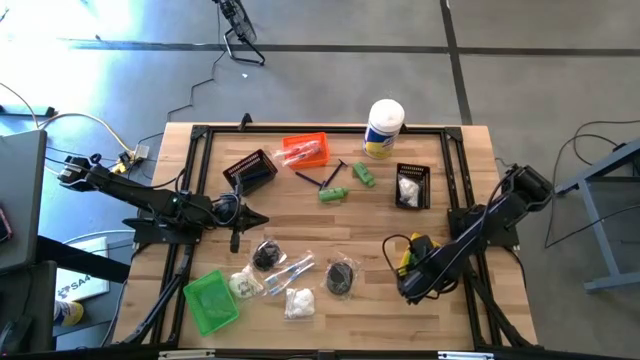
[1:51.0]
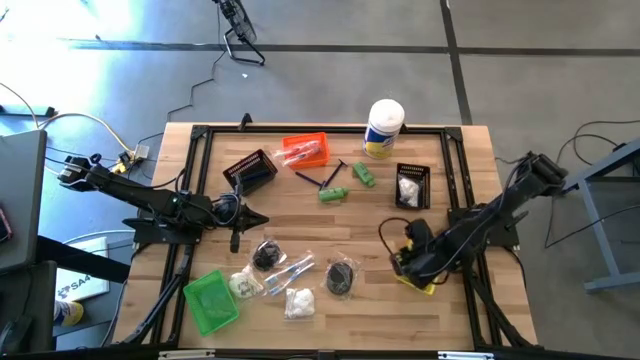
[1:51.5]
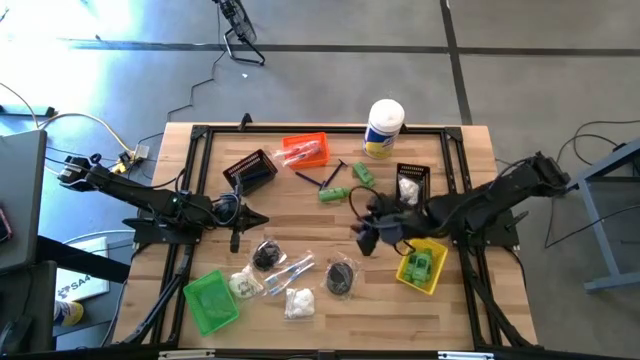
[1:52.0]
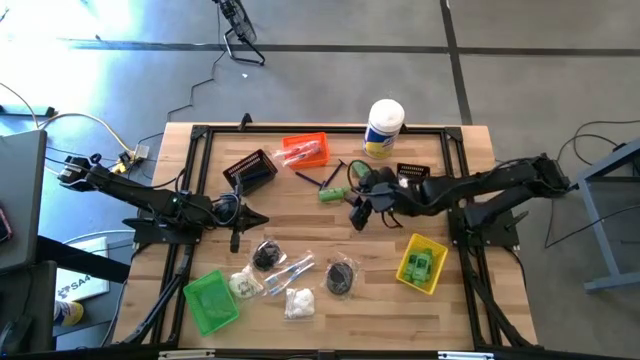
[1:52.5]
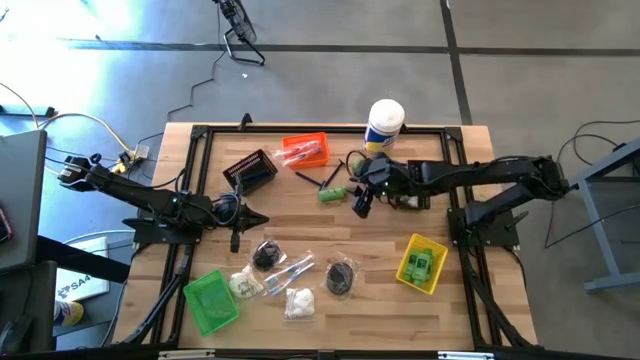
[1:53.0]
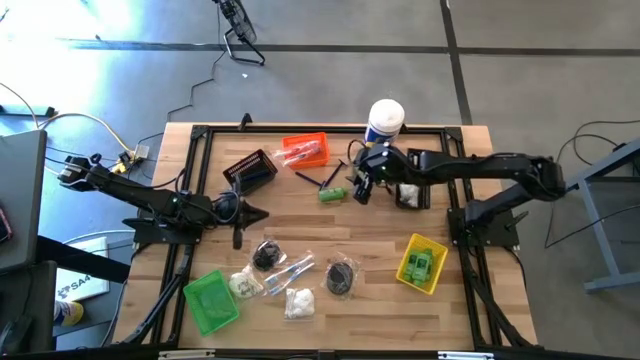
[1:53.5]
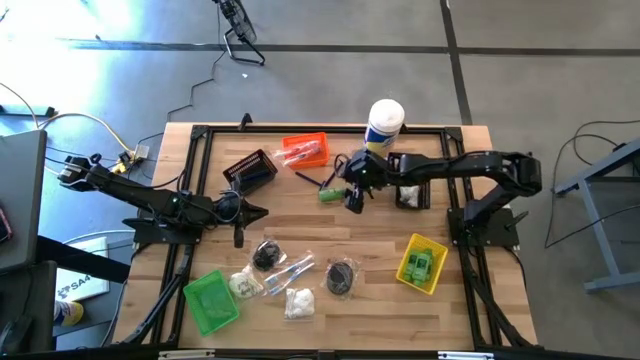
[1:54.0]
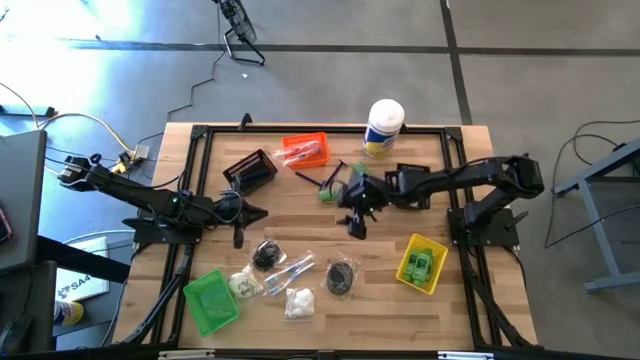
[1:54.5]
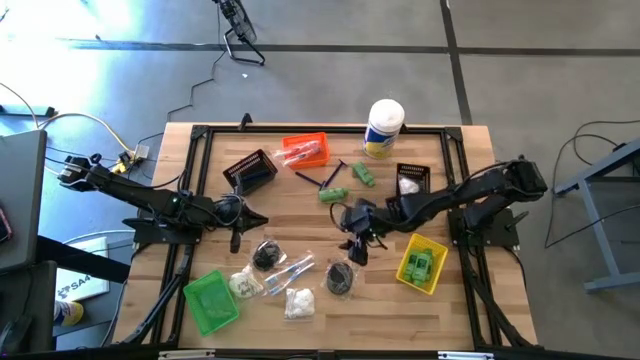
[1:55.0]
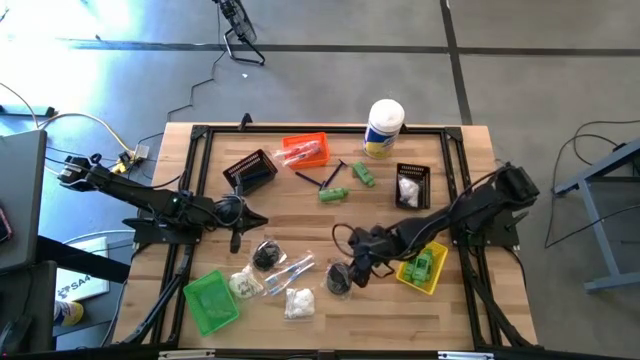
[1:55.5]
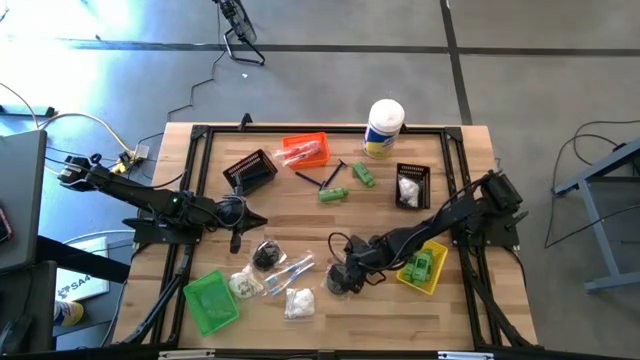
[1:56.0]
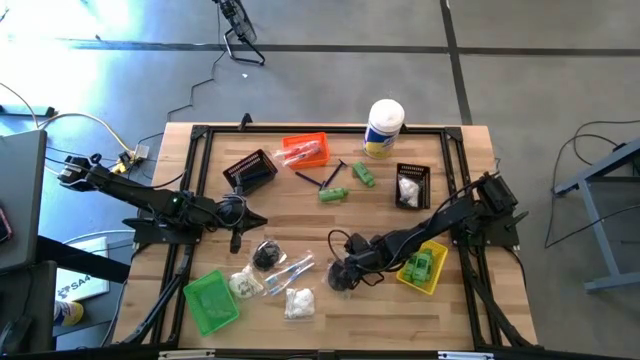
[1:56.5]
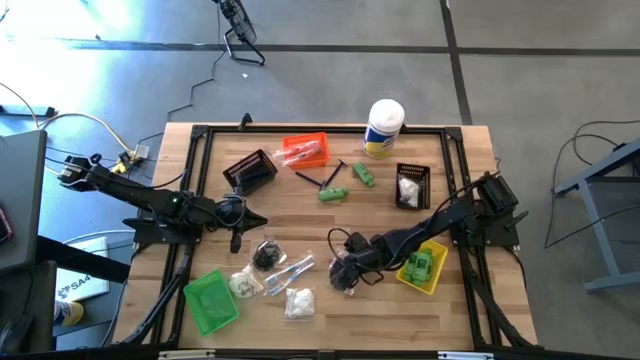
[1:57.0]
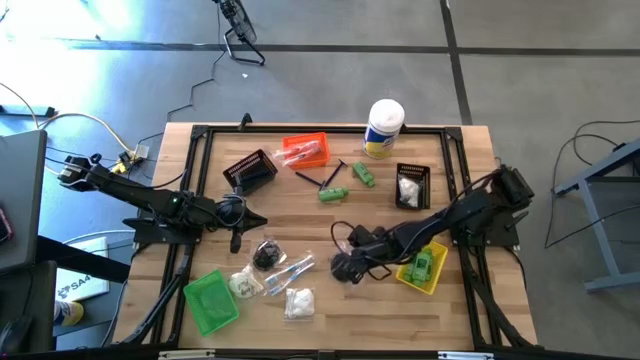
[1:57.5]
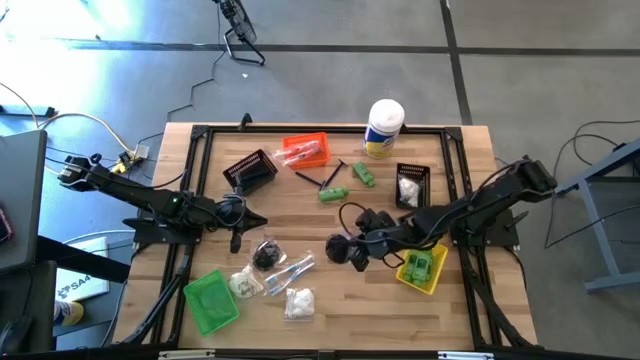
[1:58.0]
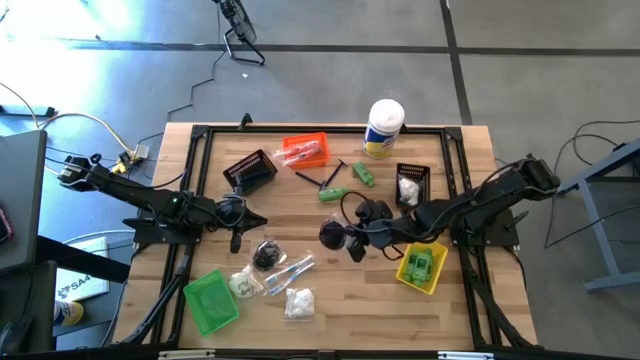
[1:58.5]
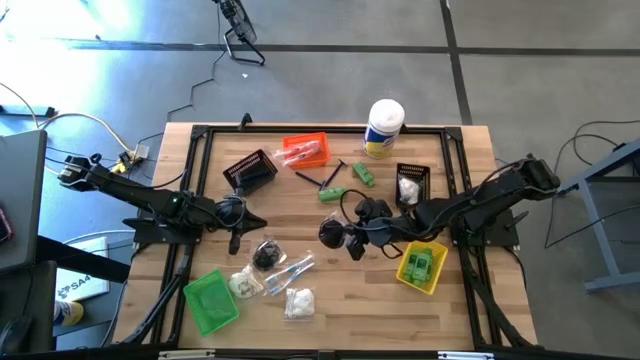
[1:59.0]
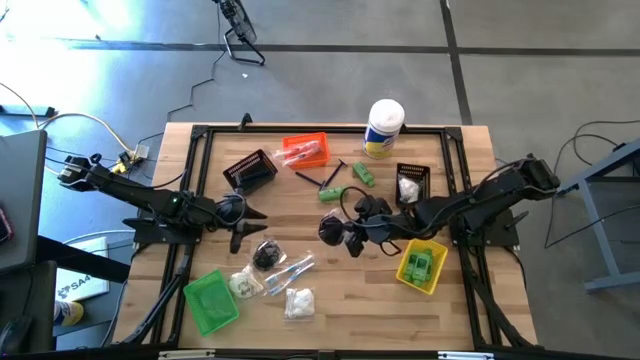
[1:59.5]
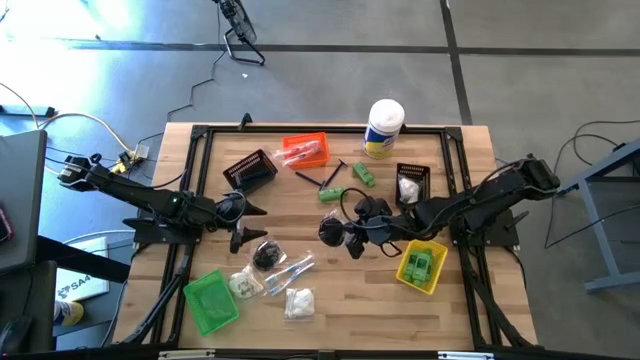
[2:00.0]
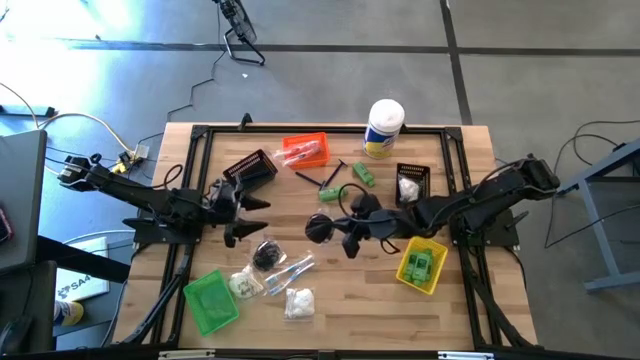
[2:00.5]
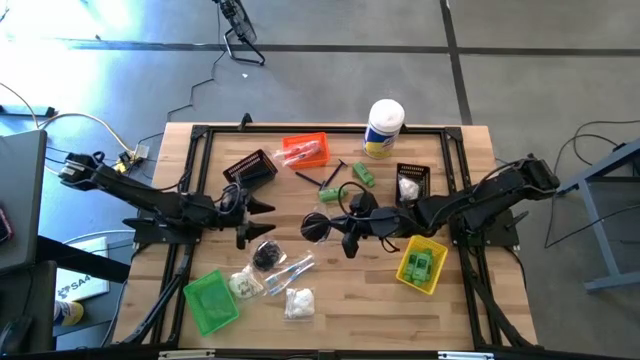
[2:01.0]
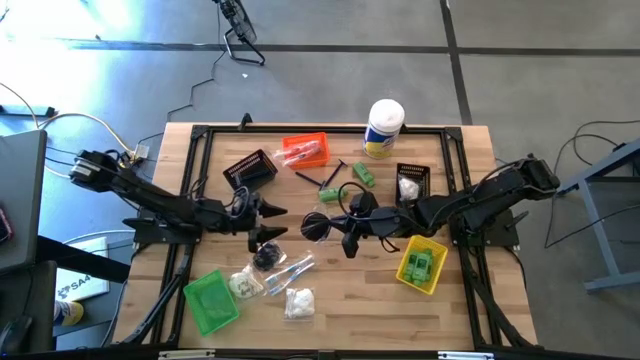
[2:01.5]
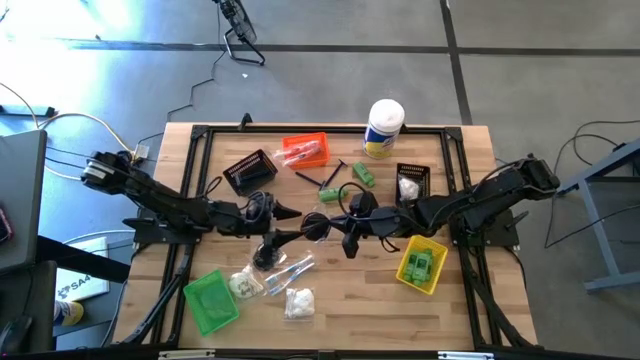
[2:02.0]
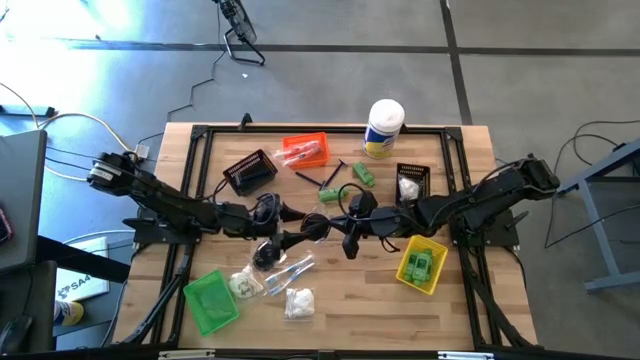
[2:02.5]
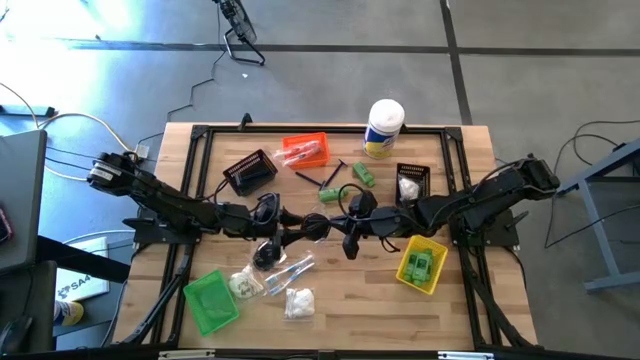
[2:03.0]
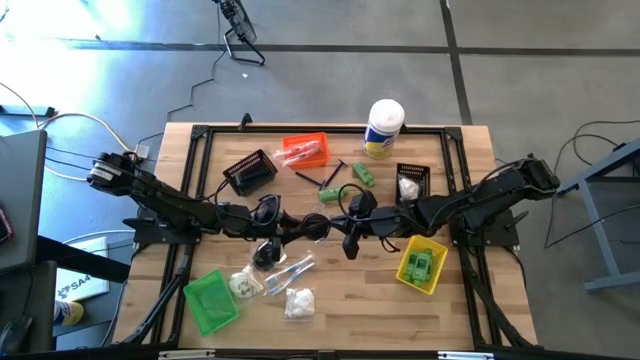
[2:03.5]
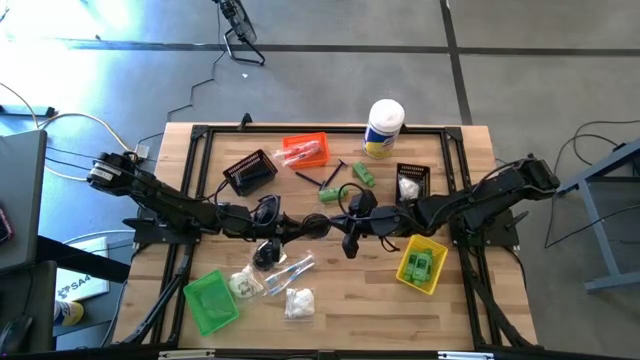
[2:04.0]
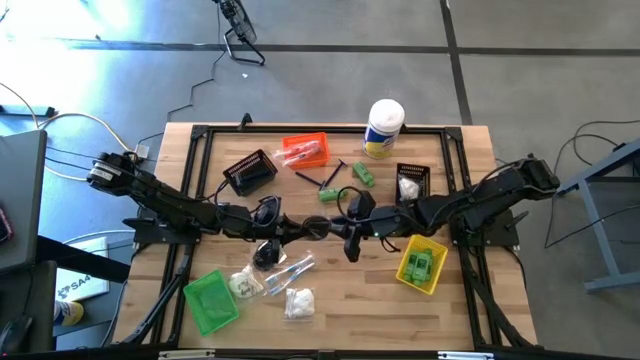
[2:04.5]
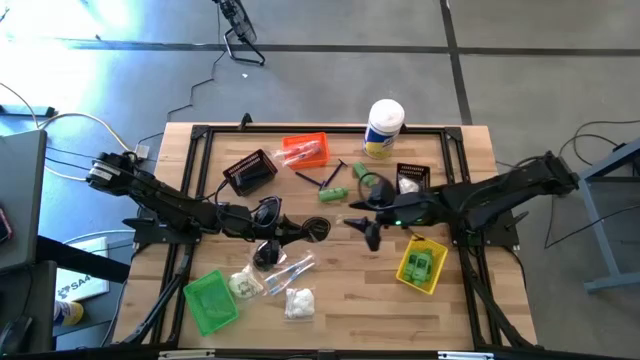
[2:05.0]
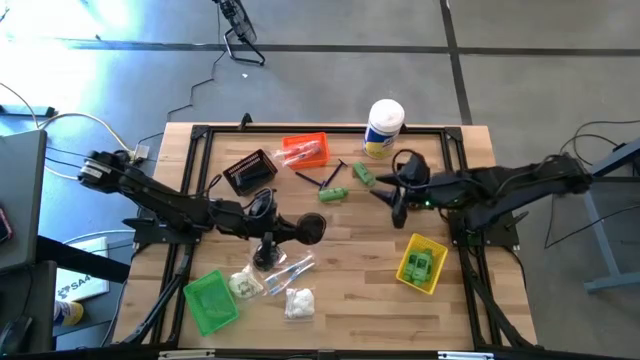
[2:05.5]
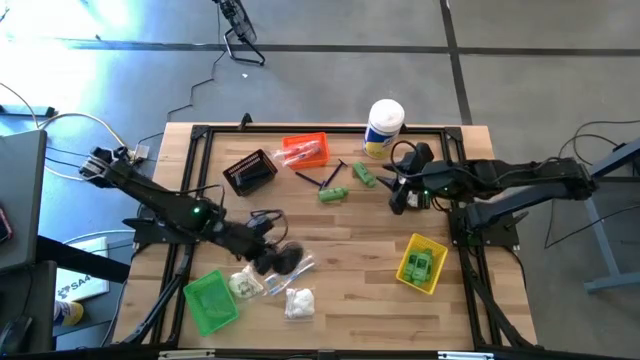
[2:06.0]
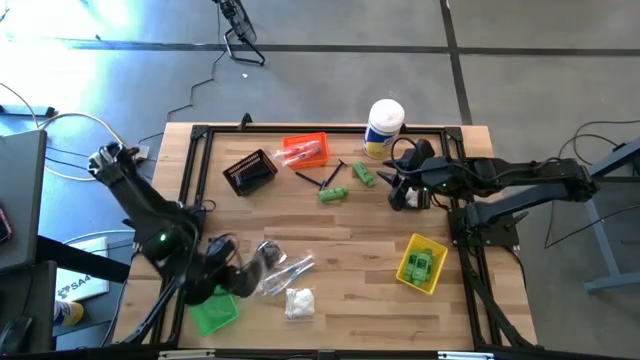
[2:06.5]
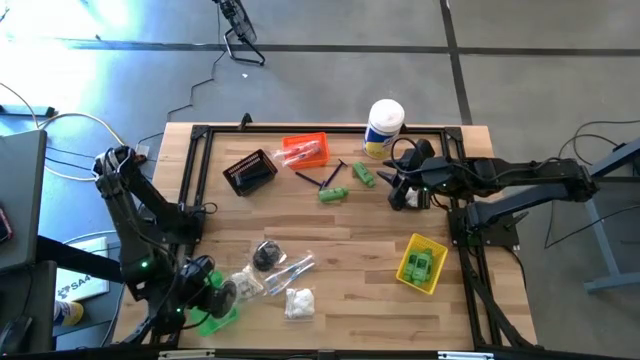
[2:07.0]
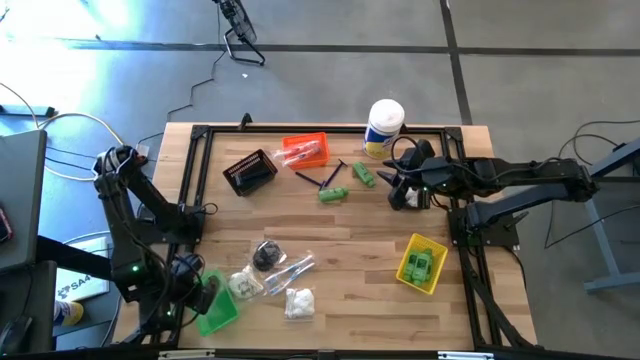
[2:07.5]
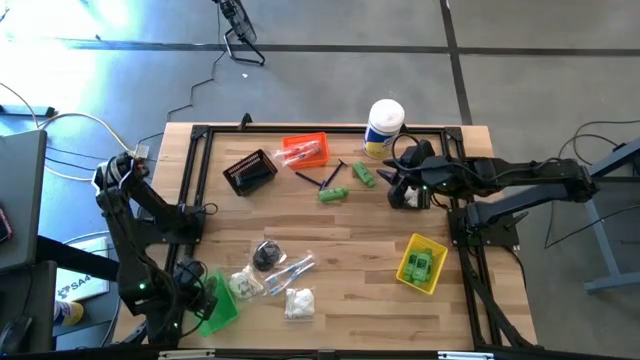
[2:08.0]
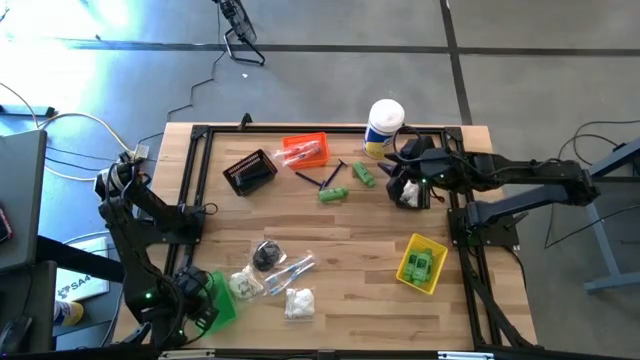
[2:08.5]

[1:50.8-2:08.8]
Task: Pick & Place Travel size toiletries
Put the black hairbrush into the green bin

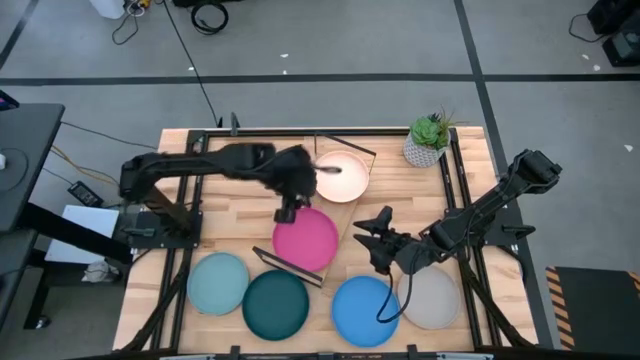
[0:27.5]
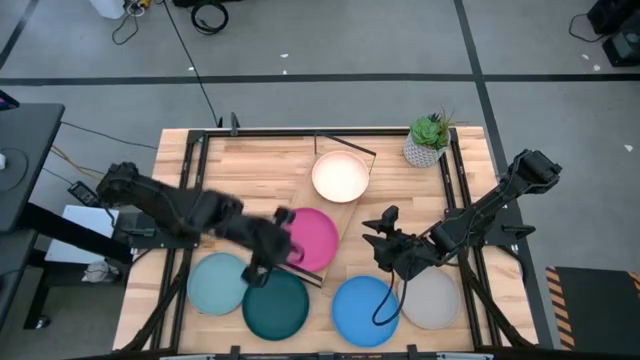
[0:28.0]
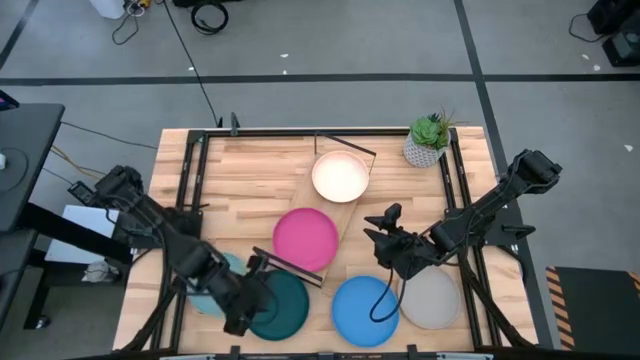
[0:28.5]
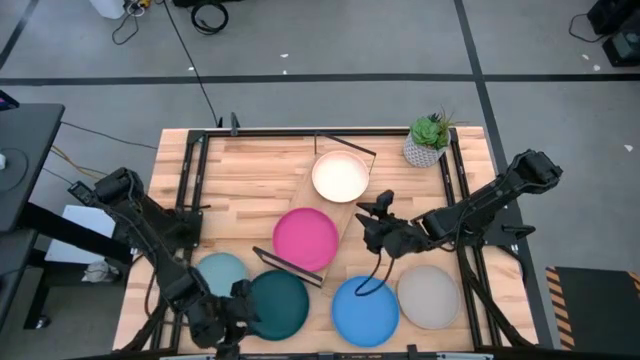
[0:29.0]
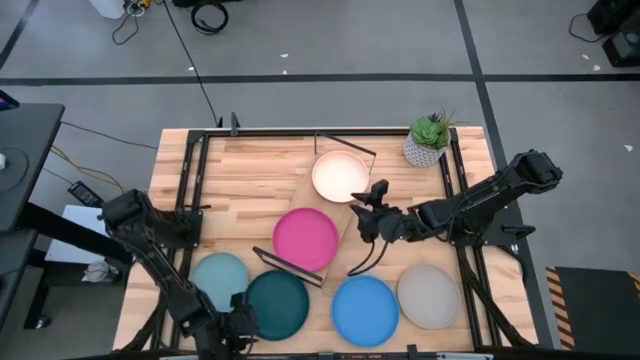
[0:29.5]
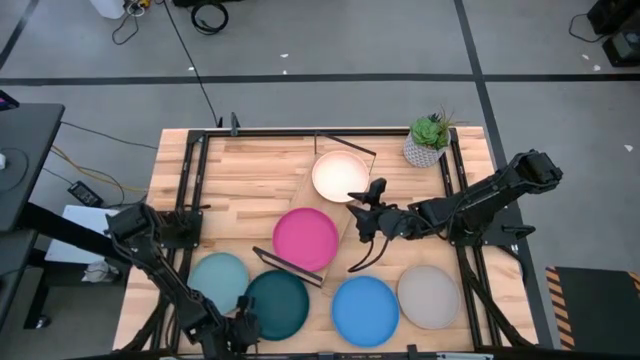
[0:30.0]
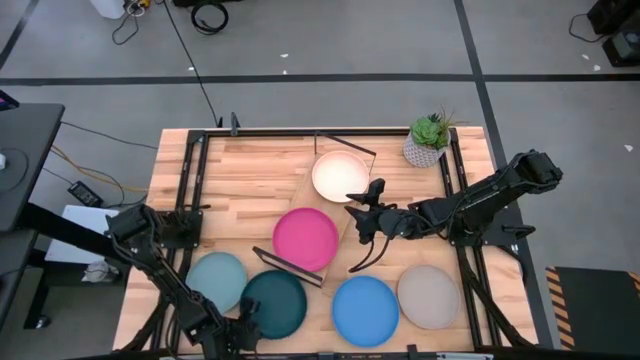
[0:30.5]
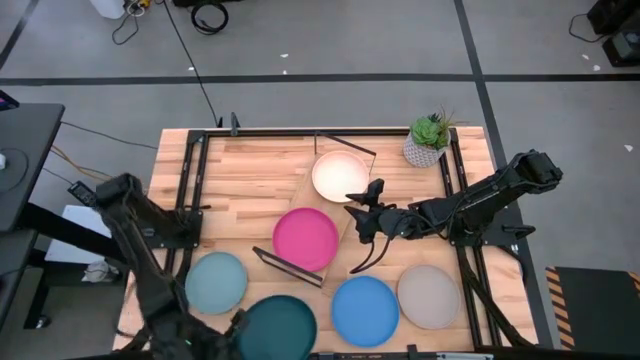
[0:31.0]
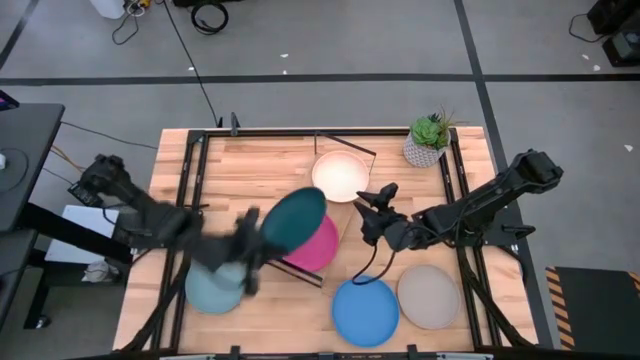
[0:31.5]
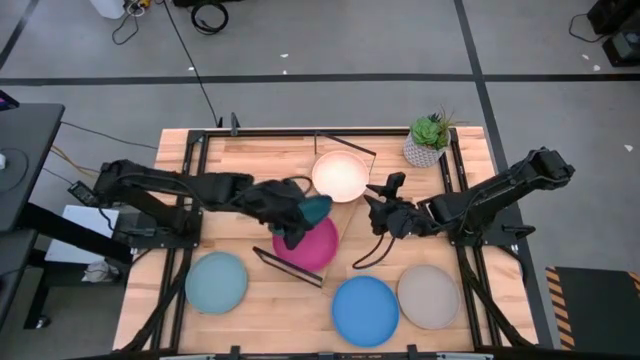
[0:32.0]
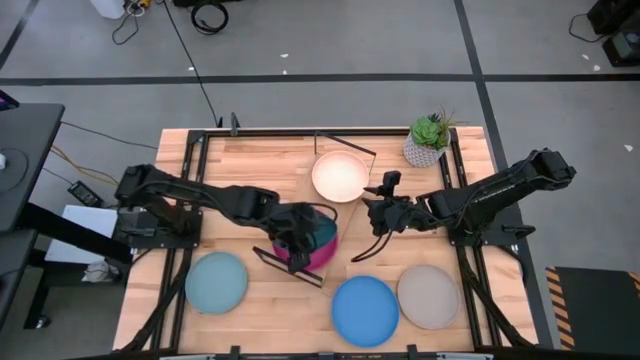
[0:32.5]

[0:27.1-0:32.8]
Task: Place and stack plates onto a shelf
Stack the dark green plate on top of the pink plate on the shelf
